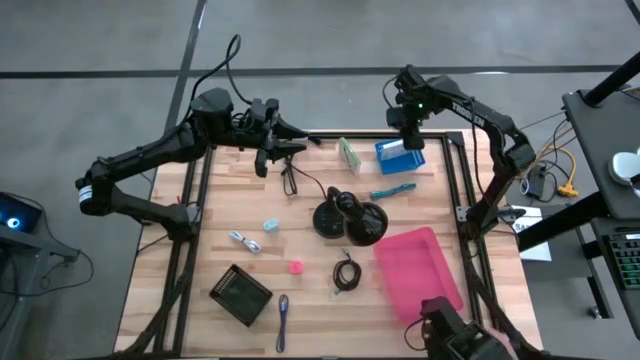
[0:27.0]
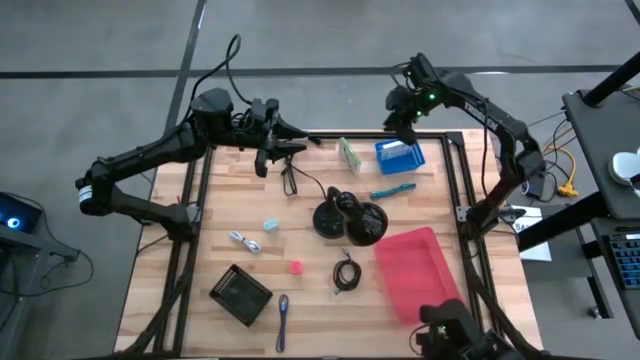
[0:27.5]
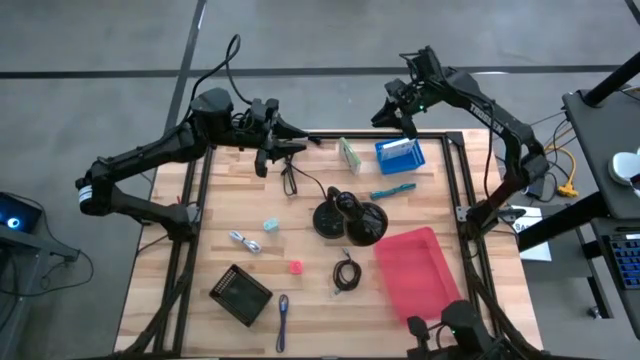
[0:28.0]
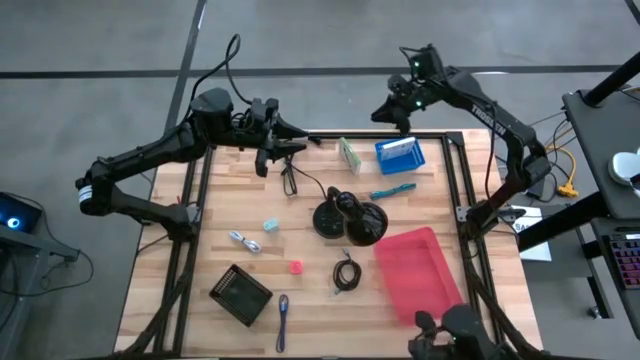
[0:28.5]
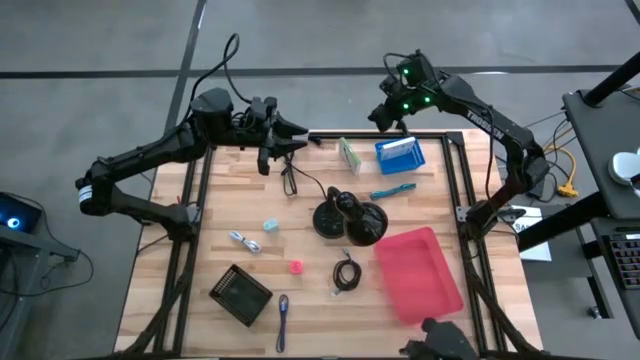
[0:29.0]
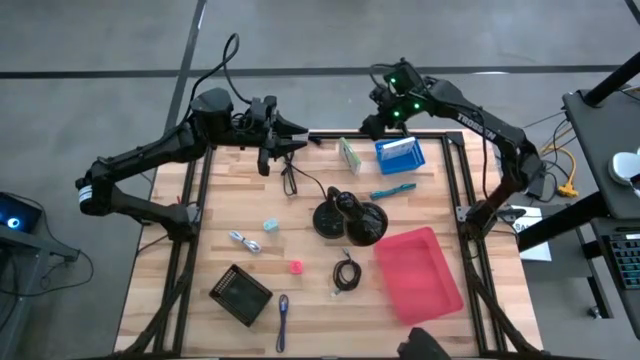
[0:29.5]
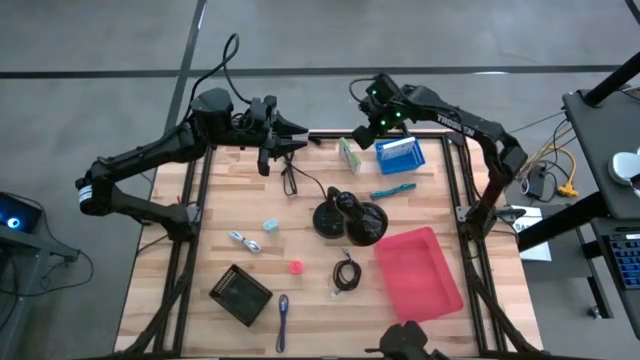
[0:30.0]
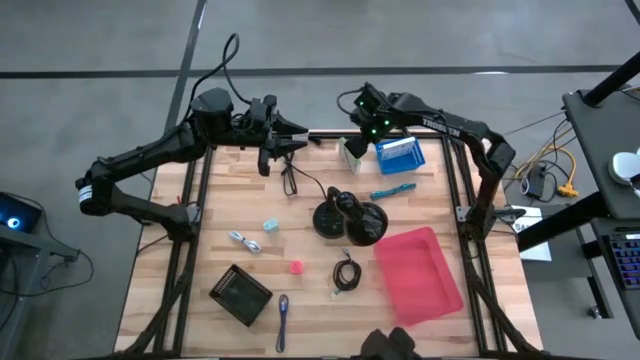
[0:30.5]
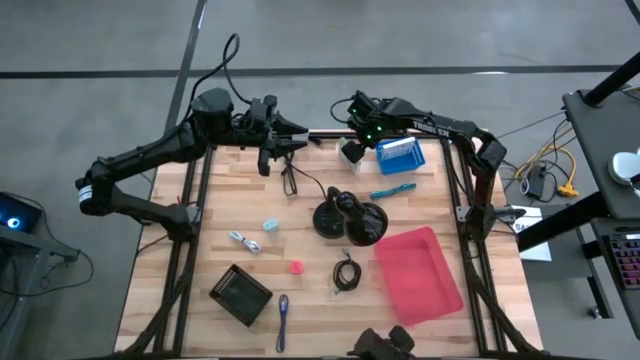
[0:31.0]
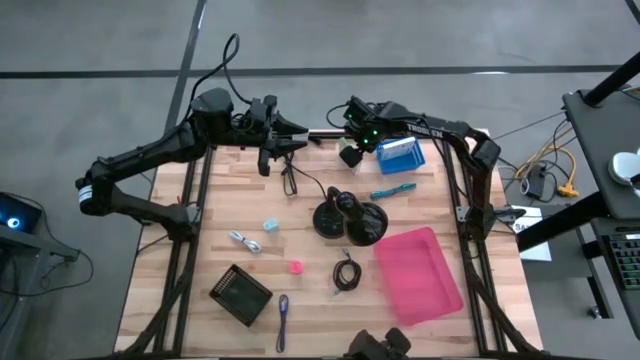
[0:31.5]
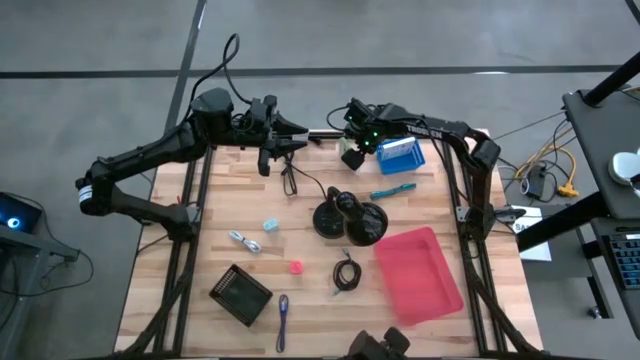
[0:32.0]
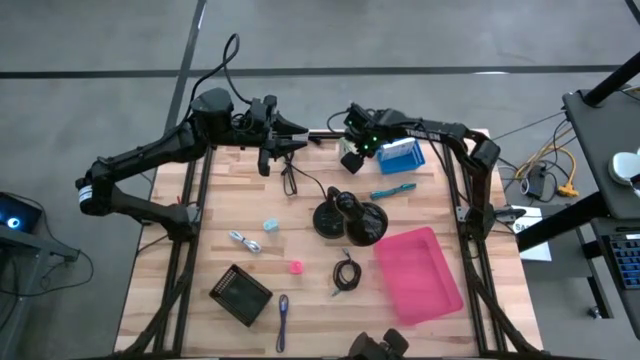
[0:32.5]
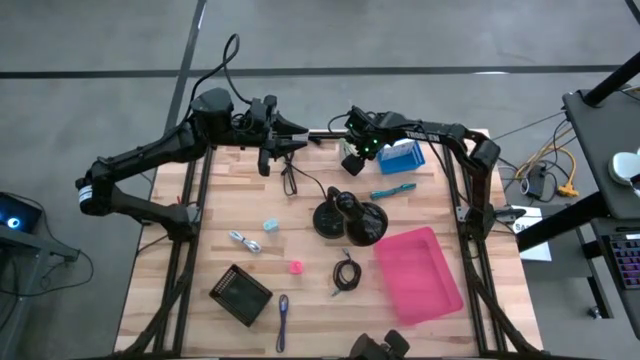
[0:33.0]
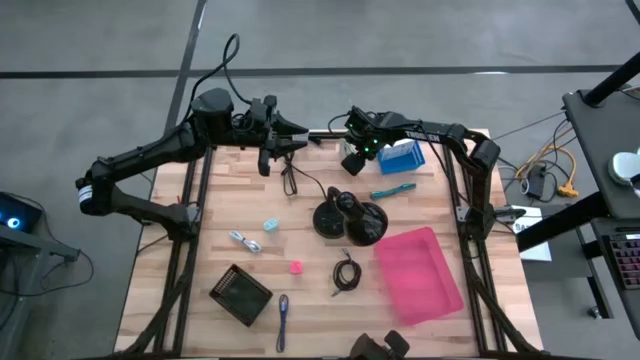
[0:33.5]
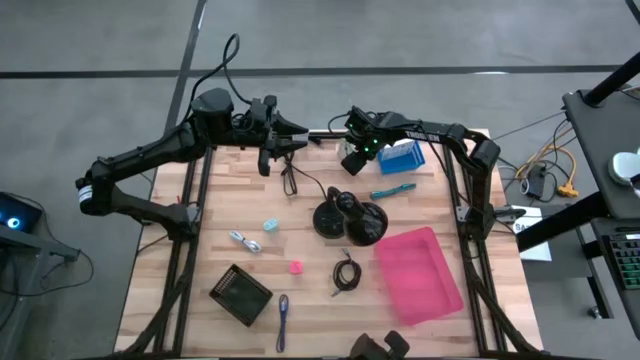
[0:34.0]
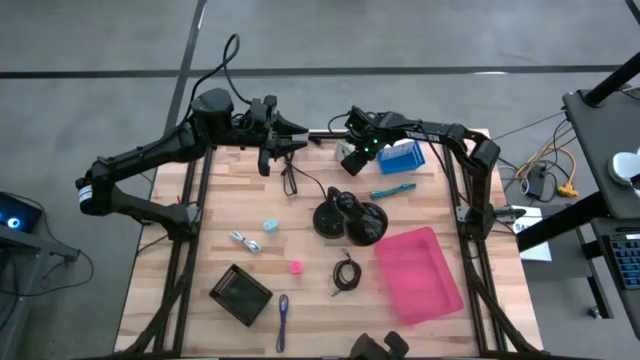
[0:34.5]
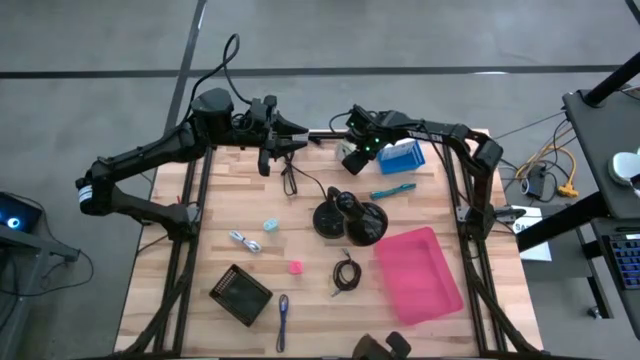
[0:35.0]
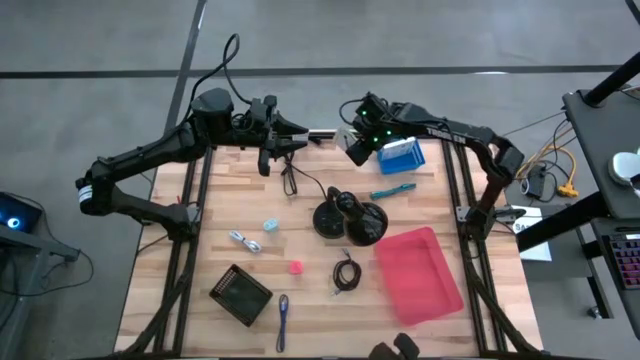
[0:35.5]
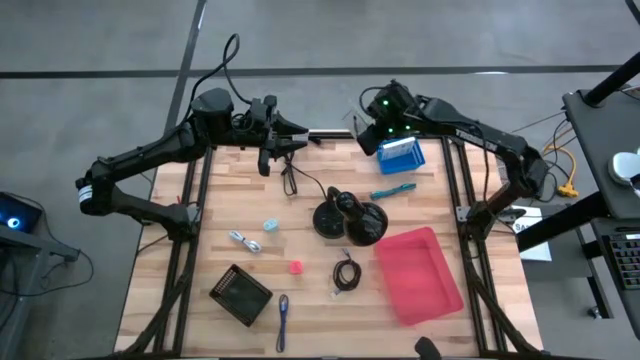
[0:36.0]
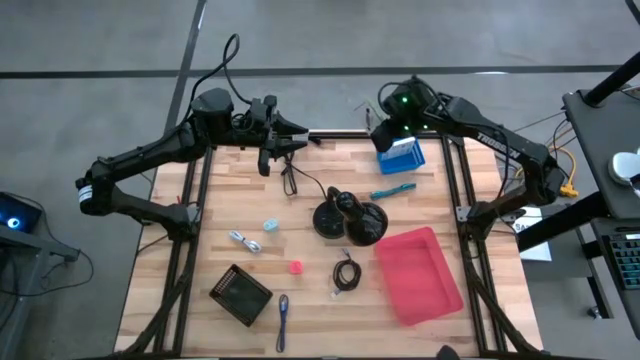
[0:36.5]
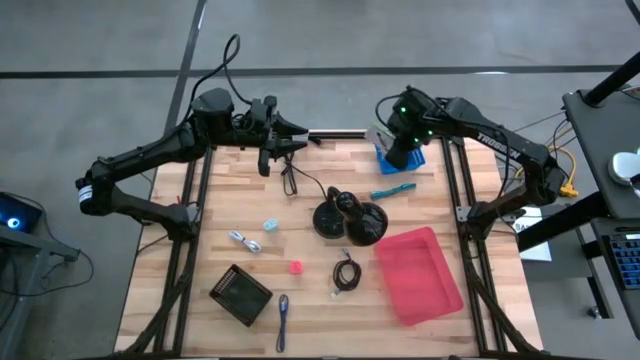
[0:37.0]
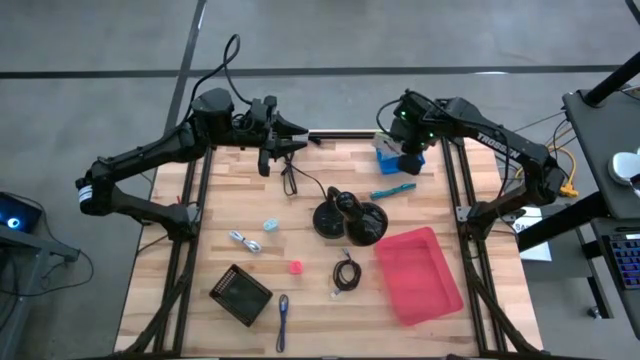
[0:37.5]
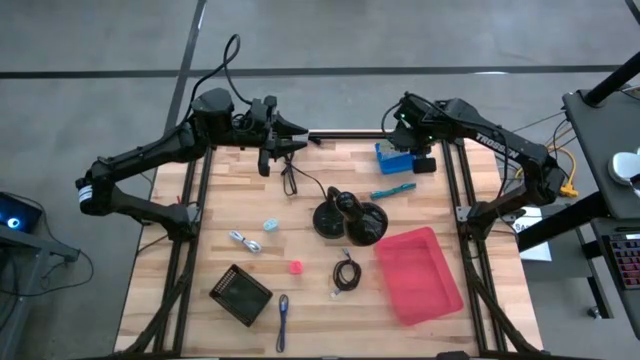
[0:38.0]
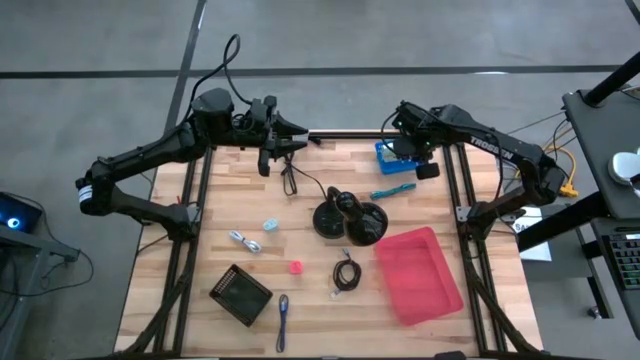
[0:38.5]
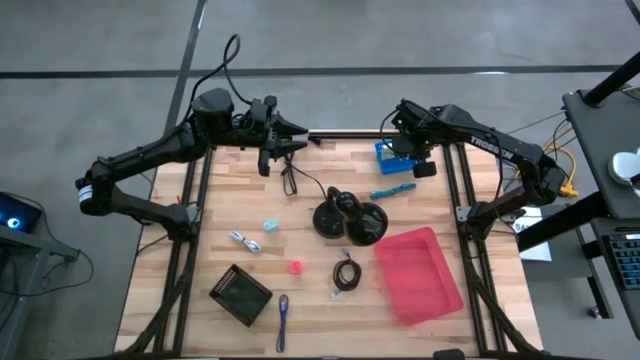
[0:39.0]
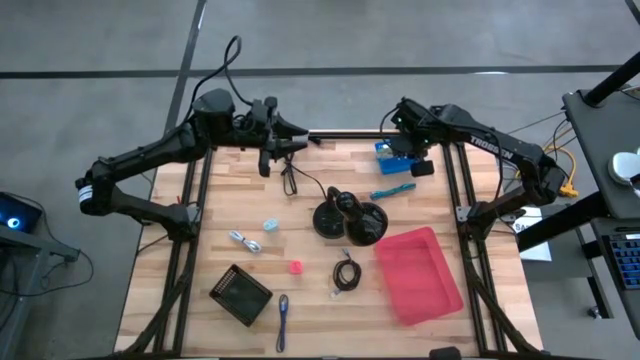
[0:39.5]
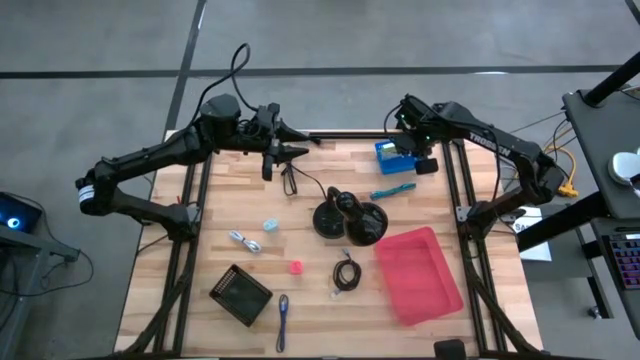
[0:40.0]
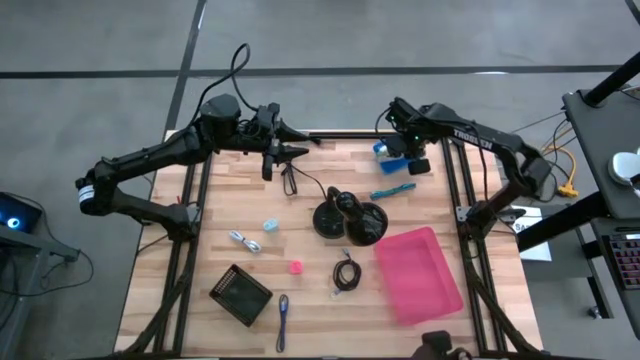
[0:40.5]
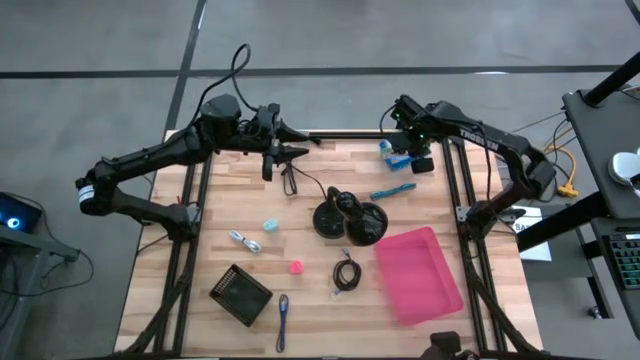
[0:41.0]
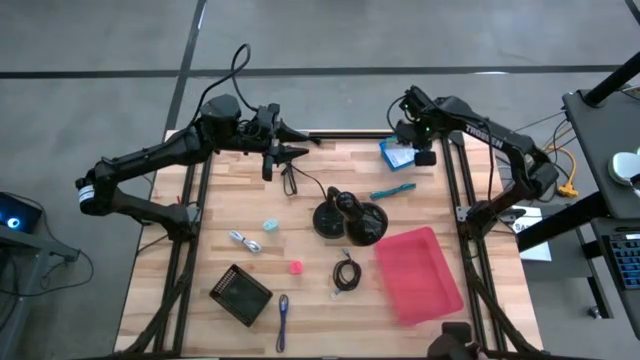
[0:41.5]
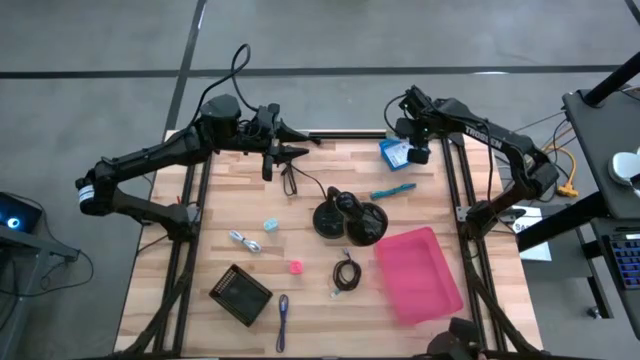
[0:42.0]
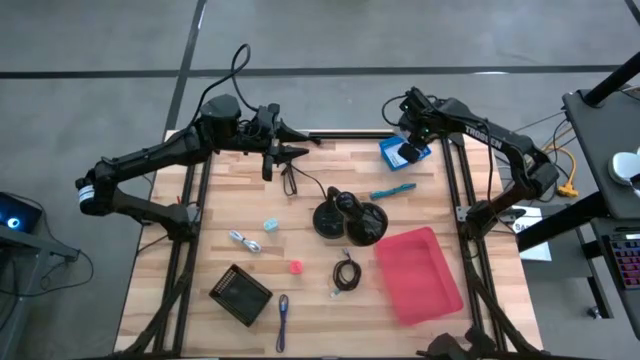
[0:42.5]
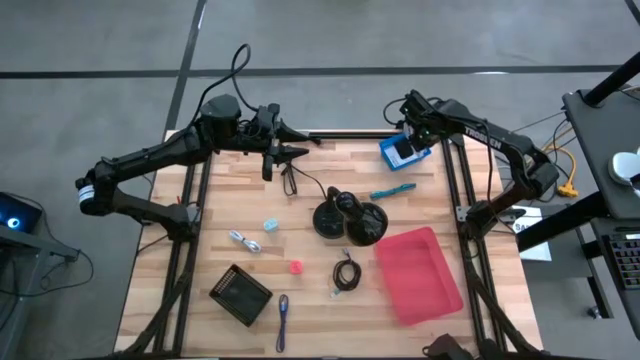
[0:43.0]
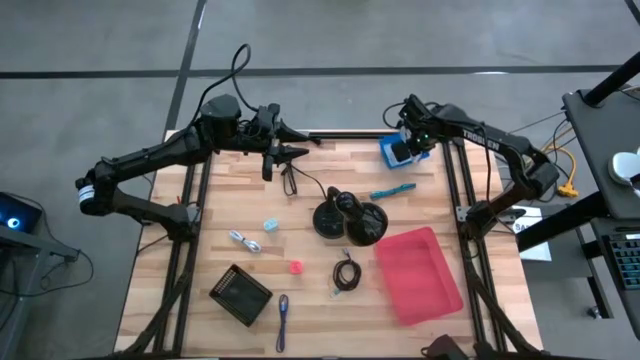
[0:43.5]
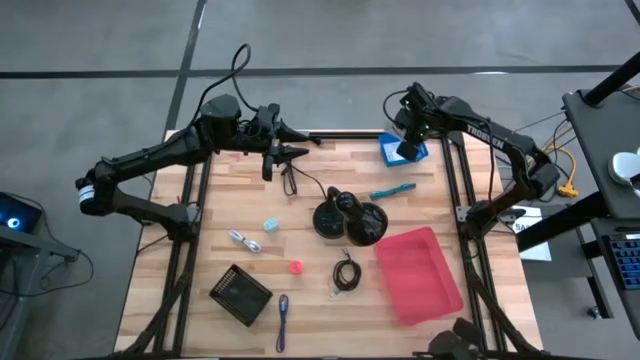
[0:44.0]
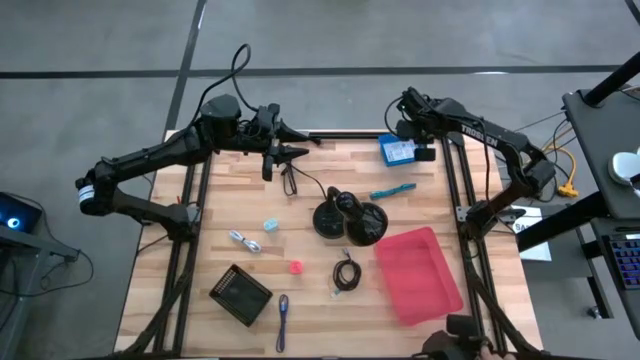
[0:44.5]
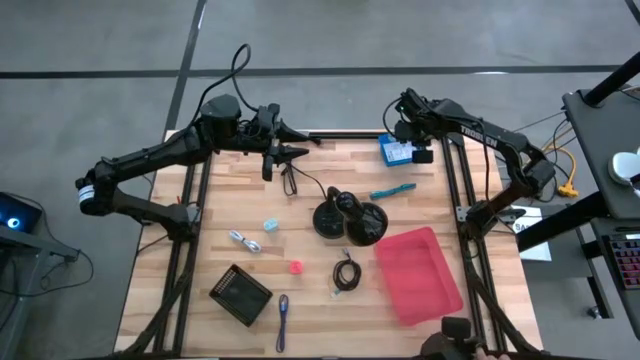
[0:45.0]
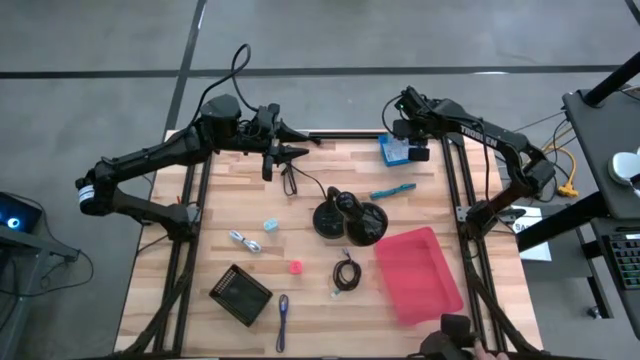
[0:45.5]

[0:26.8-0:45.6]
Task: Pick and place items into bin
Put the white card reader box into the blue bin

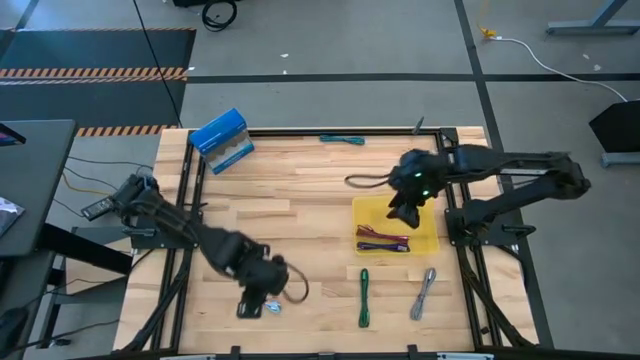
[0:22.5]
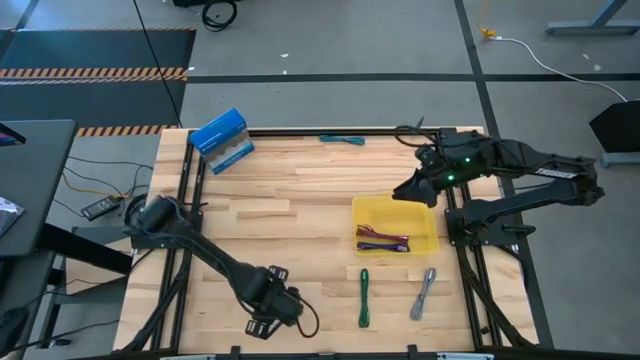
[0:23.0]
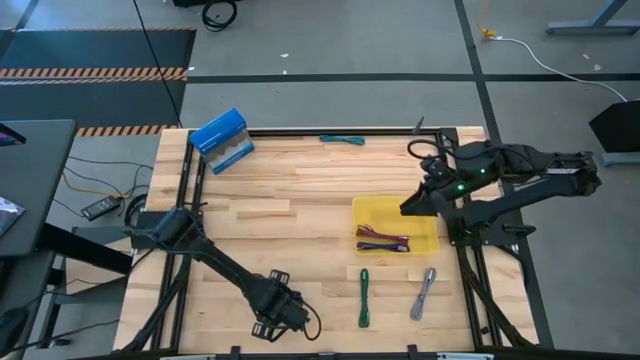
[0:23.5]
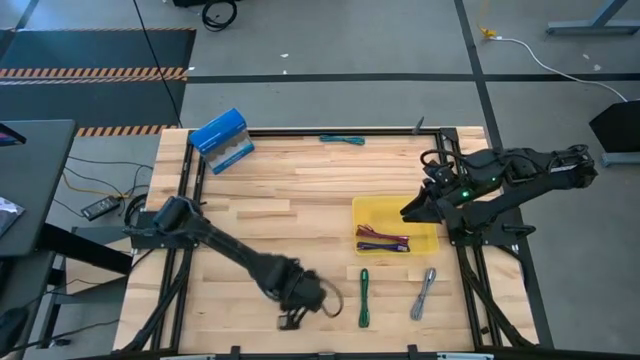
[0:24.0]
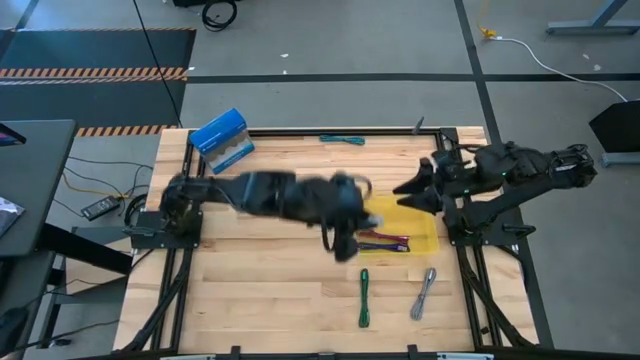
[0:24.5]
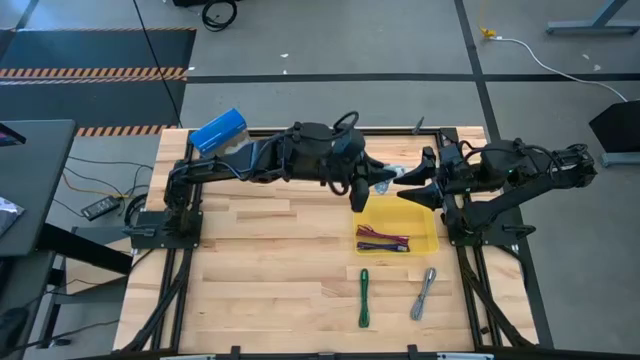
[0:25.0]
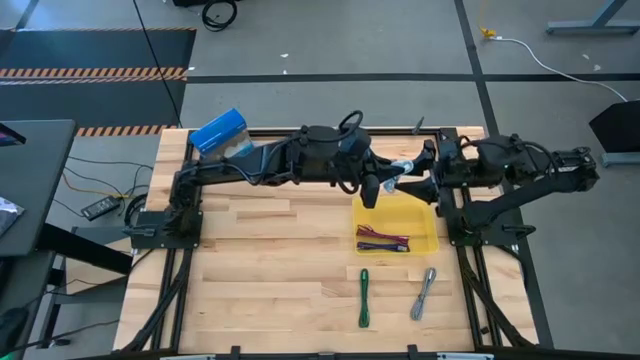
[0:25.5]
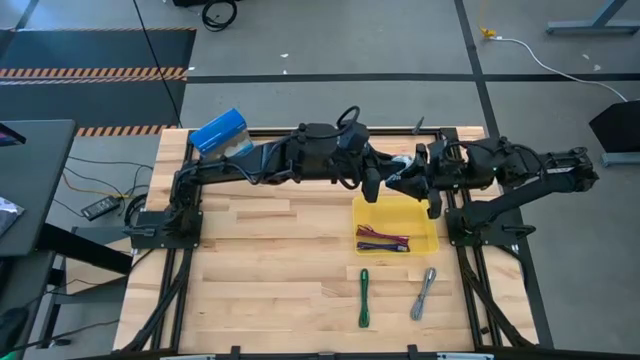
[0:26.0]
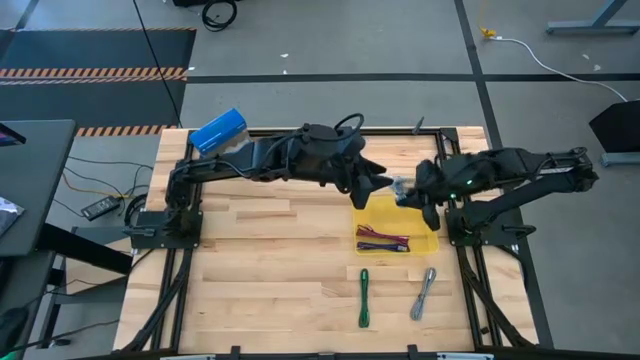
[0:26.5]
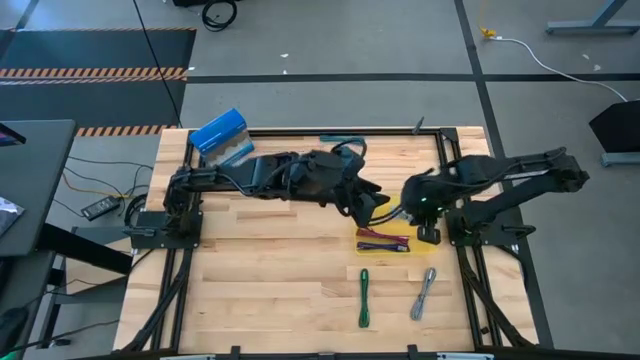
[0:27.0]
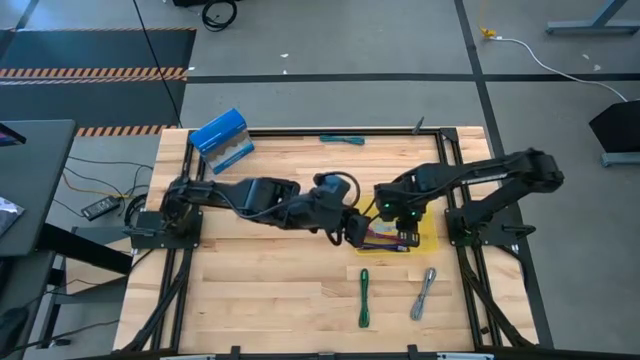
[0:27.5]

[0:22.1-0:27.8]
Task: Pick and place USB-C Cables
Put the light blue charger cable into the yellow bin
